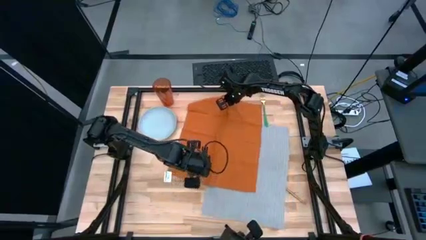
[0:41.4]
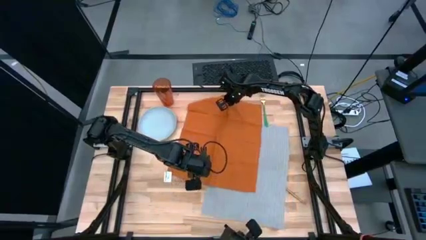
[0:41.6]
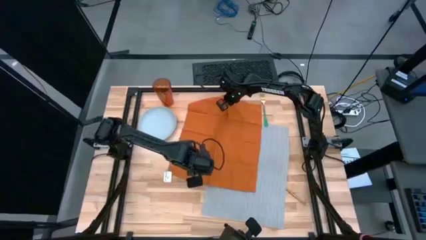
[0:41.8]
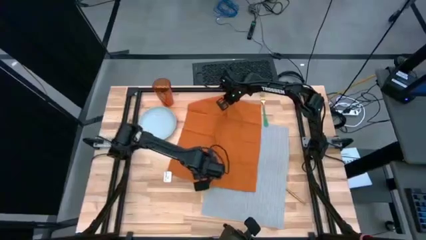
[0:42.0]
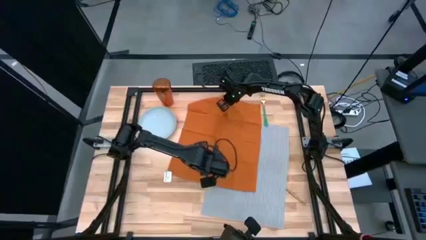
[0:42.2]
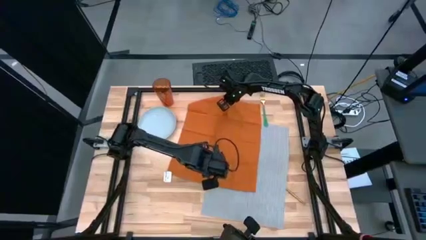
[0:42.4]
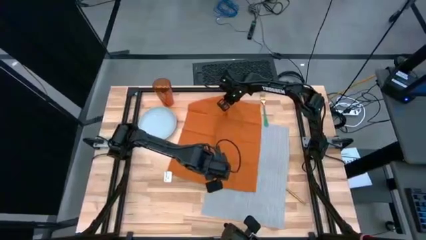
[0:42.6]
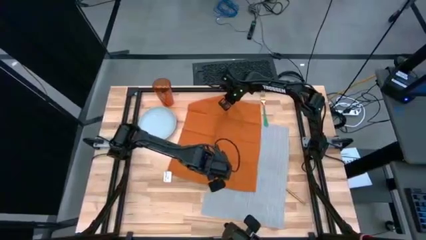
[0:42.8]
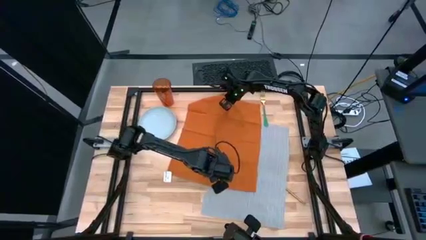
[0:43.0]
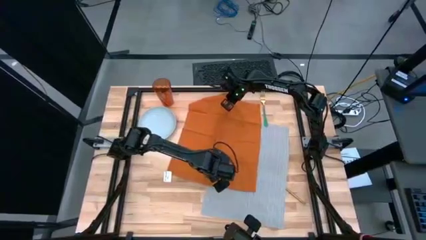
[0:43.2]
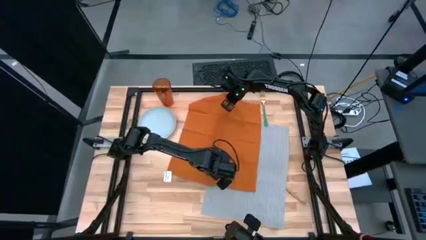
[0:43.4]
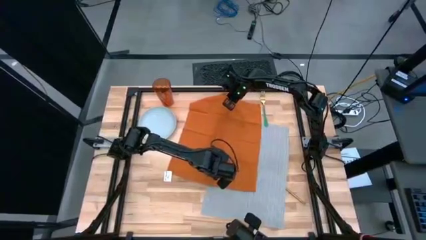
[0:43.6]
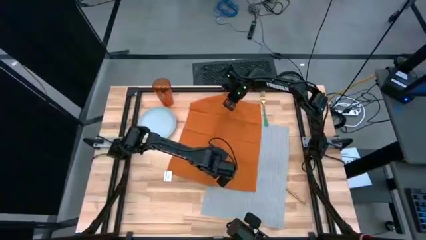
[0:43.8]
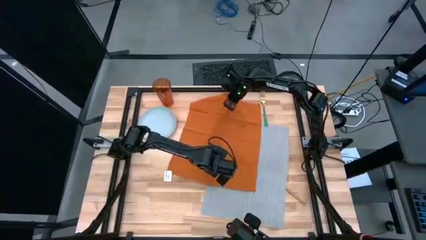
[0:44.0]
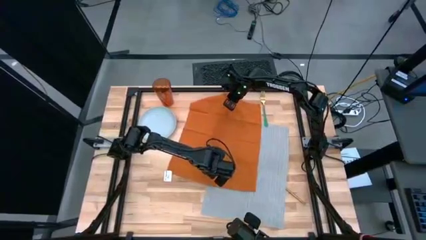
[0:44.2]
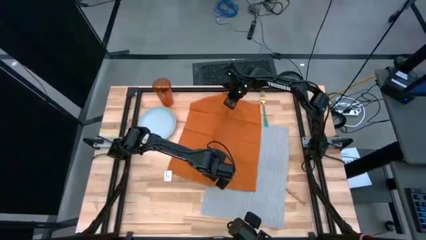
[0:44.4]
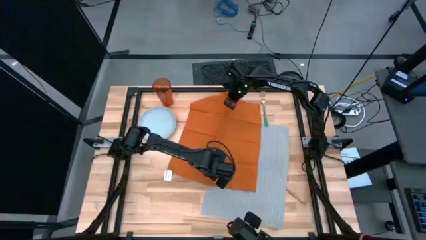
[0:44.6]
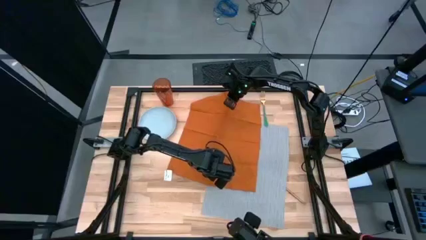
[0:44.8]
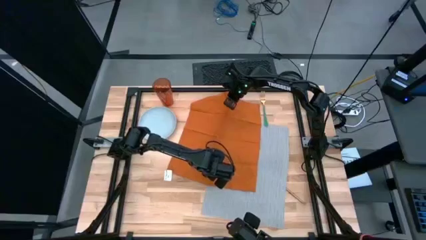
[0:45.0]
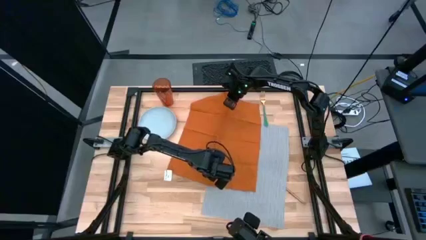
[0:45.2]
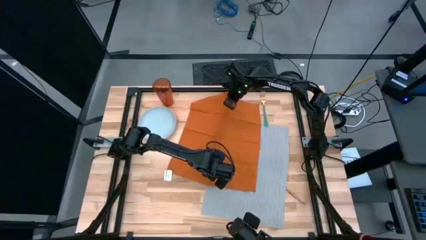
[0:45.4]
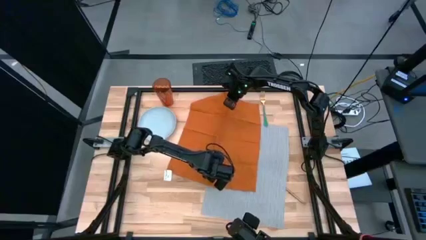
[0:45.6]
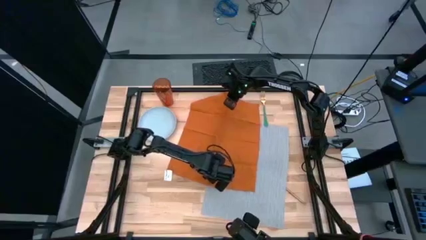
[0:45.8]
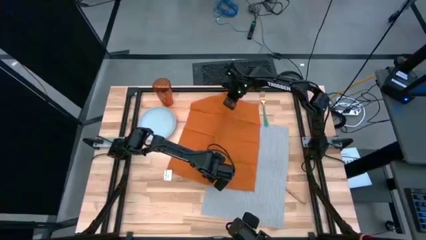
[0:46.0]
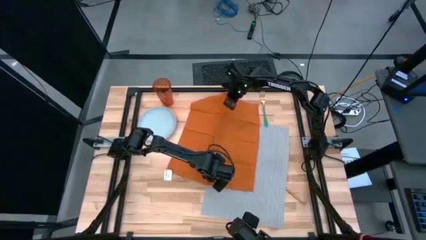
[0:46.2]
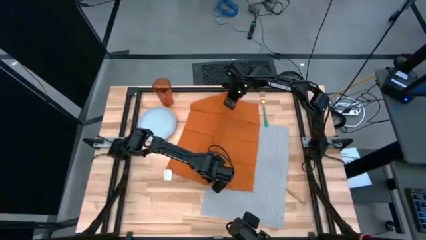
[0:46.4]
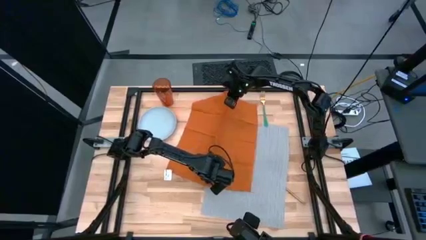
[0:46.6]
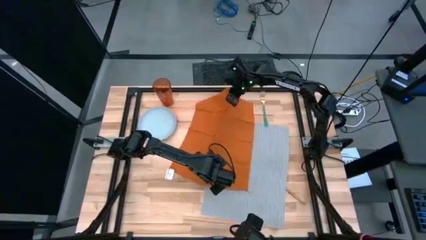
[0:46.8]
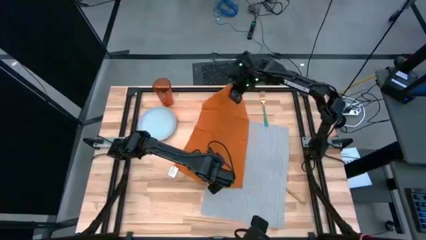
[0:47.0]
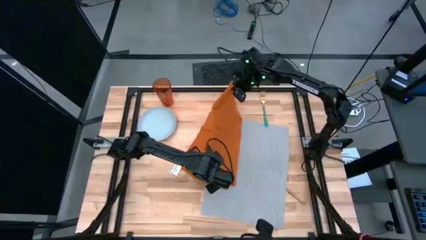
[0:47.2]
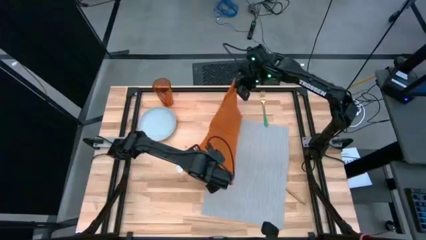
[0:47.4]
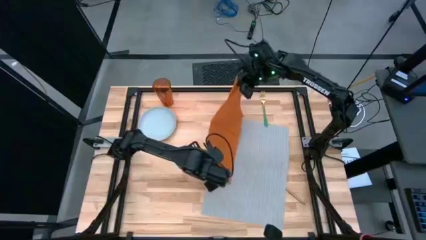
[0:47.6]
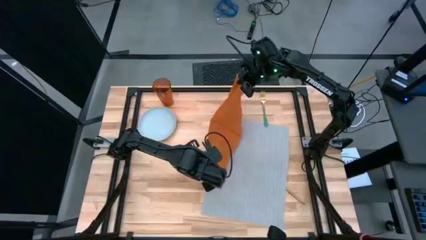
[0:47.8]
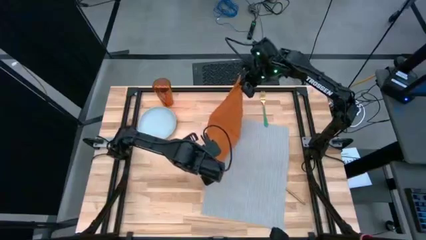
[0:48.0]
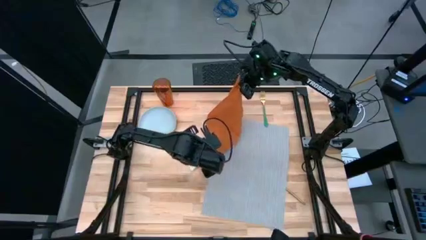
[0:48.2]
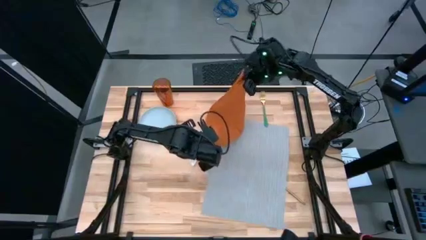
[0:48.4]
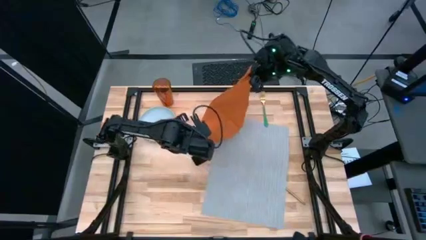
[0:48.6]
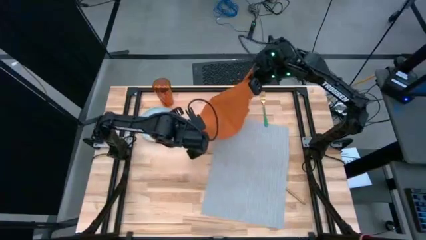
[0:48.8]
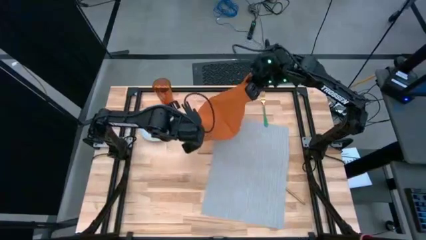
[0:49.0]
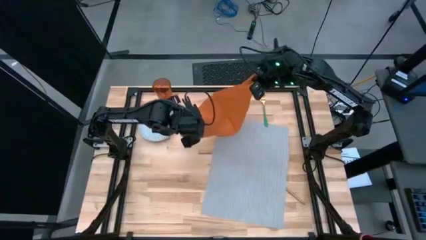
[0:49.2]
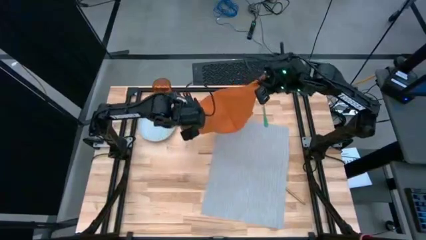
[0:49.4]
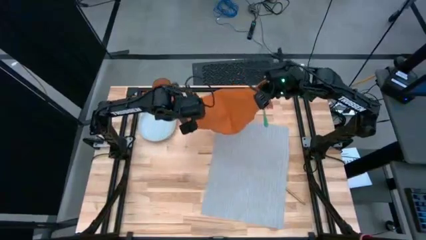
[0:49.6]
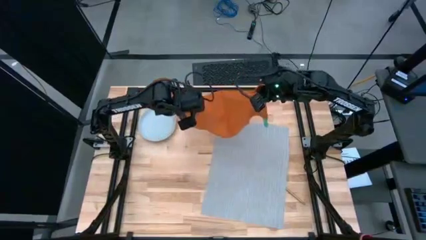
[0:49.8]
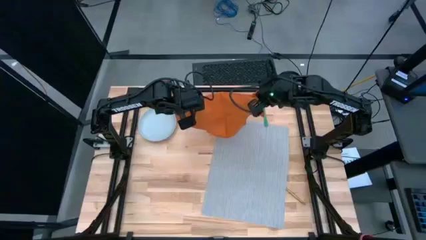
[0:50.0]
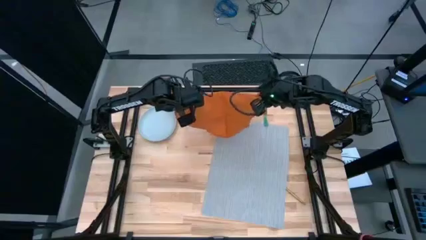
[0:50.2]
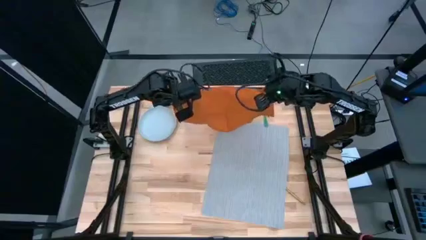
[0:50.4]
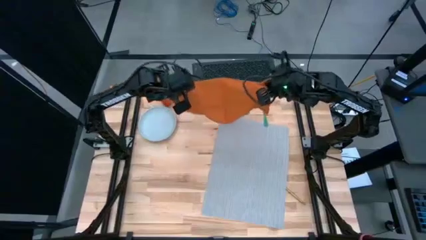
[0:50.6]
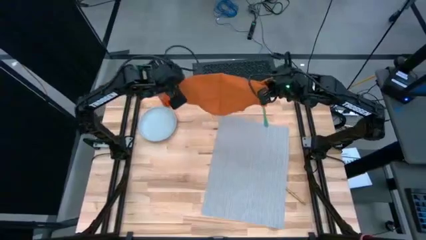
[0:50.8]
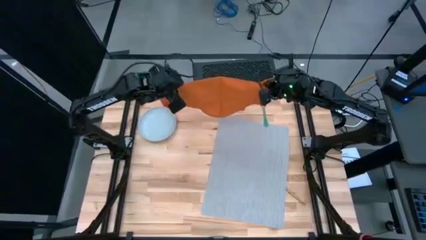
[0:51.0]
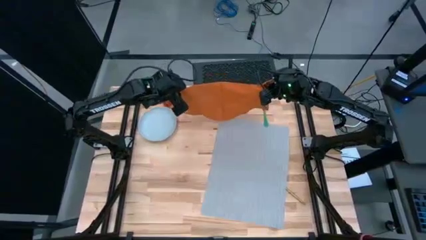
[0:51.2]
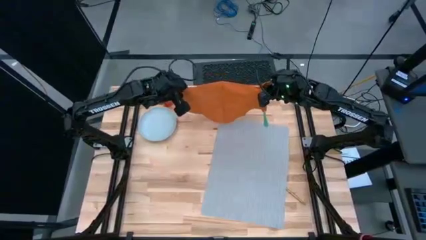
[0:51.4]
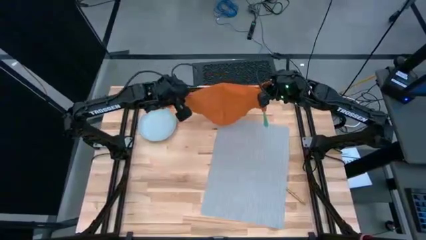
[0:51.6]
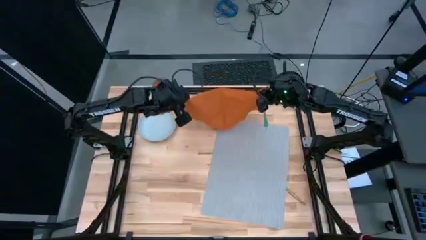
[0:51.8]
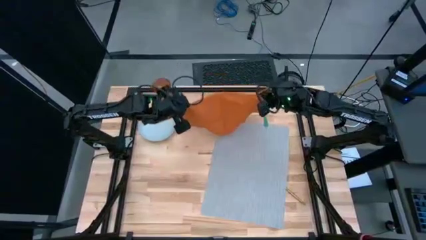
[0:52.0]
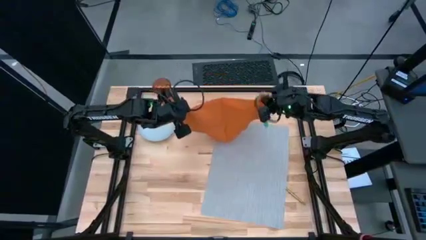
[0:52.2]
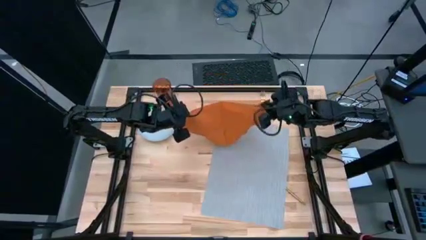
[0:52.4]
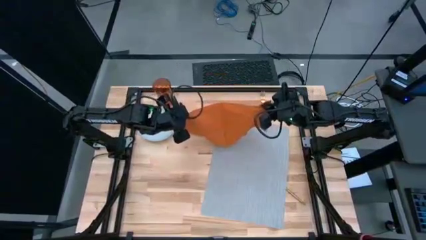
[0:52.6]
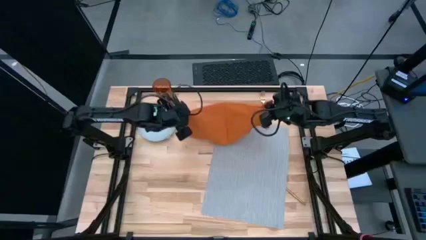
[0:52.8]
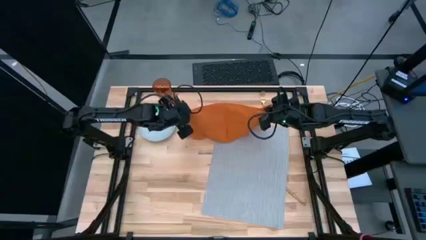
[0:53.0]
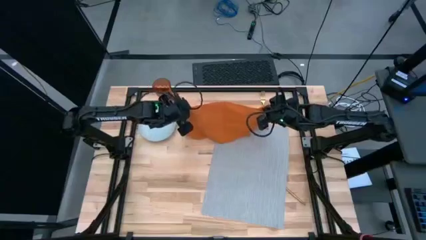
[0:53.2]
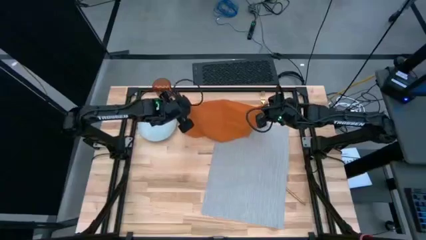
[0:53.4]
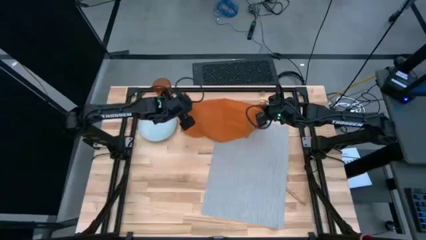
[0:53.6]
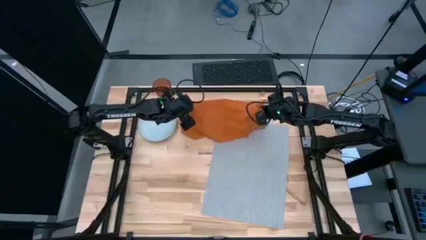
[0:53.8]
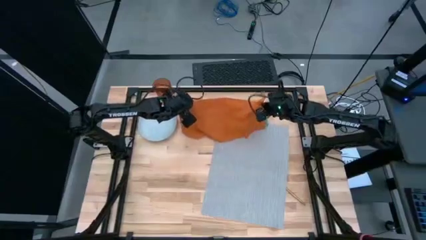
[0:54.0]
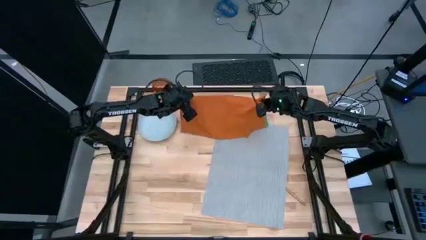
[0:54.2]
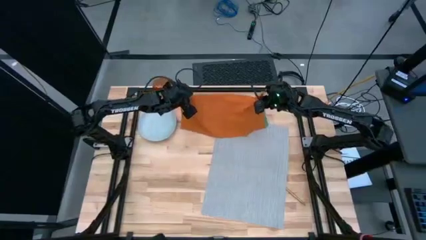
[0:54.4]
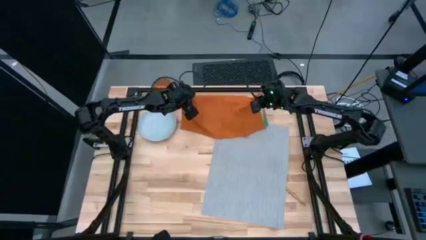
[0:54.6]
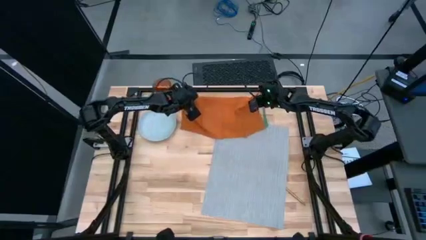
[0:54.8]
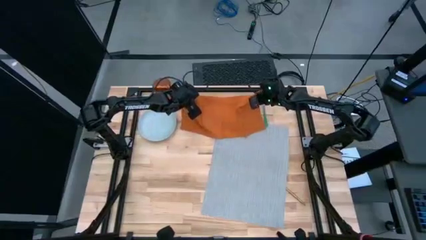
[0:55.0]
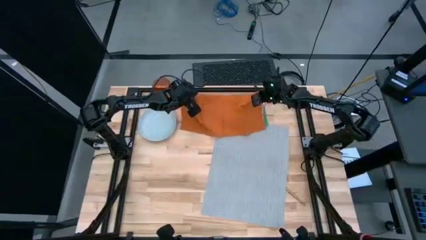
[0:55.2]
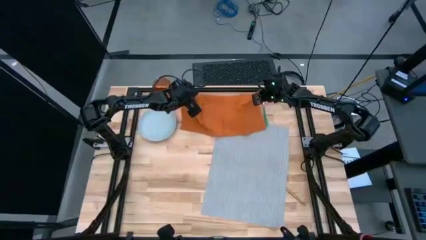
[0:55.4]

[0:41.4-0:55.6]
Task: Set table place
Fold the orange napkin

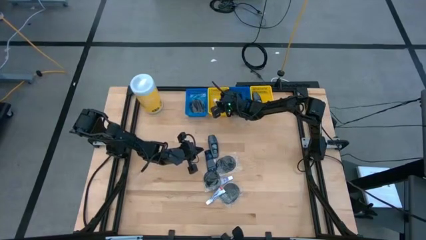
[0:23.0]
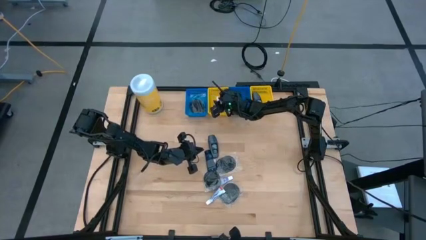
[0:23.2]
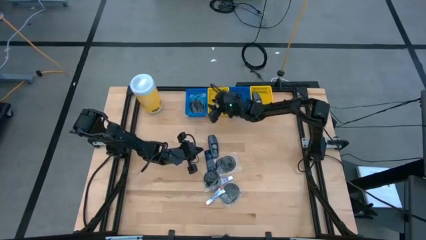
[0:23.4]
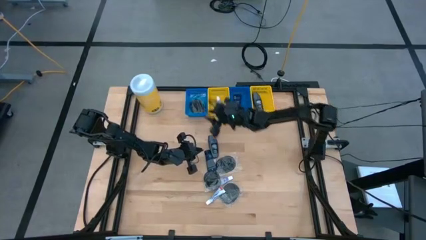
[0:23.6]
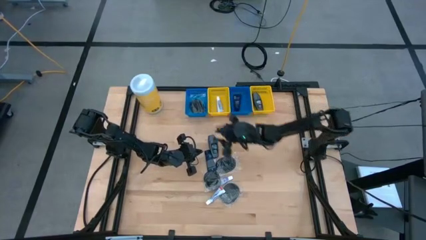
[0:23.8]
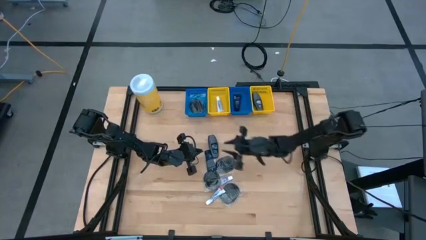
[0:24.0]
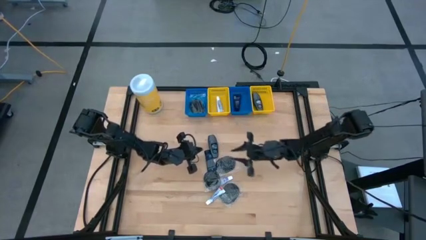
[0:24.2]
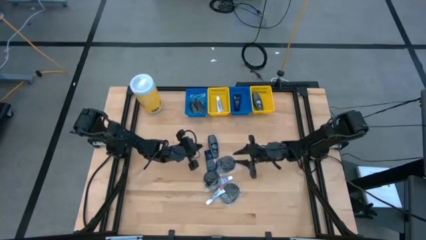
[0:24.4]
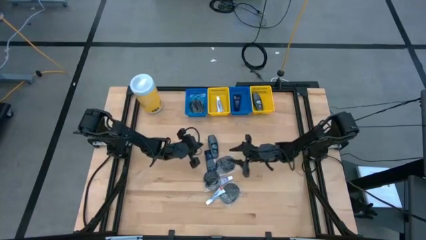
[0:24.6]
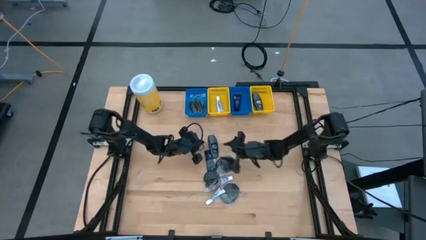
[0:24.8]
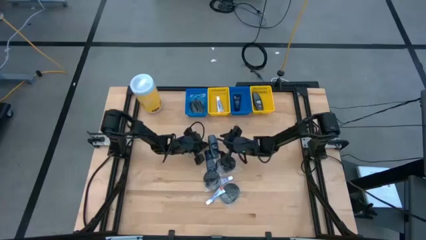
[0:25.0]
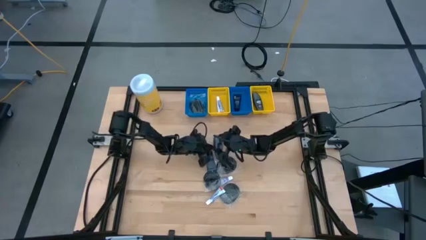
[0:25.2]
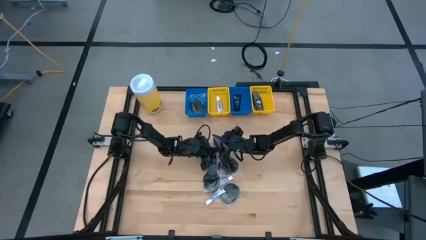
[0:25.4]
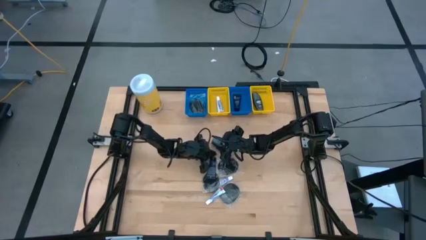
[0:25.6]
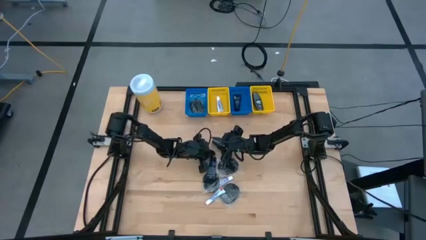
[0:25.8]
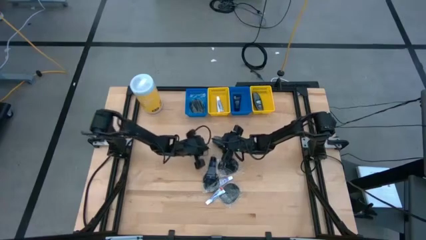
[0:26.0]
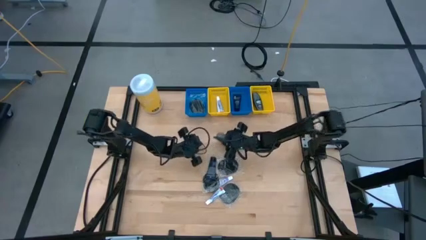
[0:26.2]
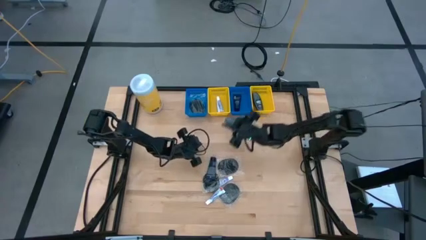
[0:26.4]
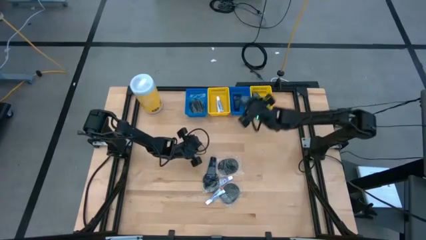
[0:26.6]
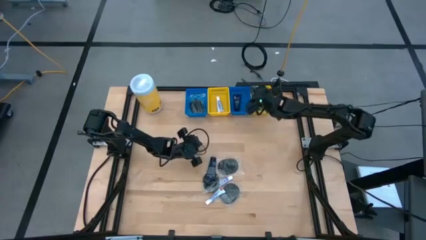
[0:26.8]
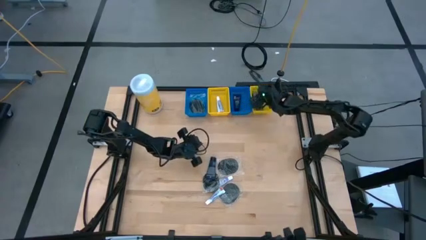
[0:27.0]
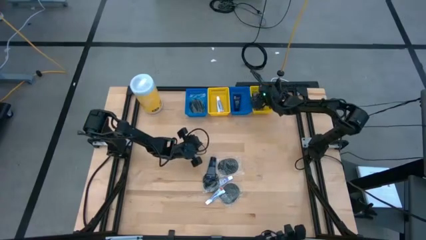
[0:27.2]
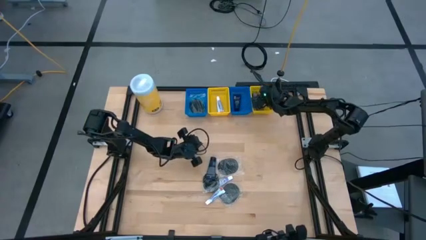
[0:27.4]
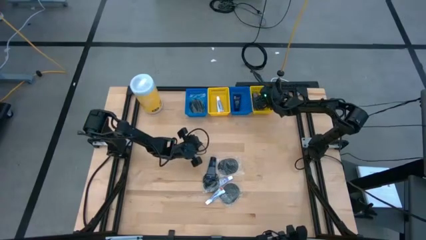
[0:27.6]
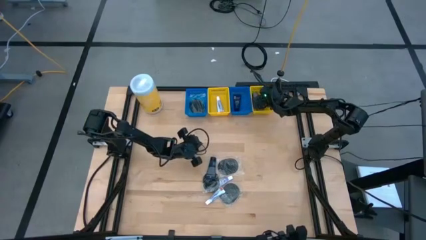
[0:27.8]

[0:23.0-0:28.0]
Task: Pick & Place Travel size toiletries
Put the gray deodorant into the right yellow bin
